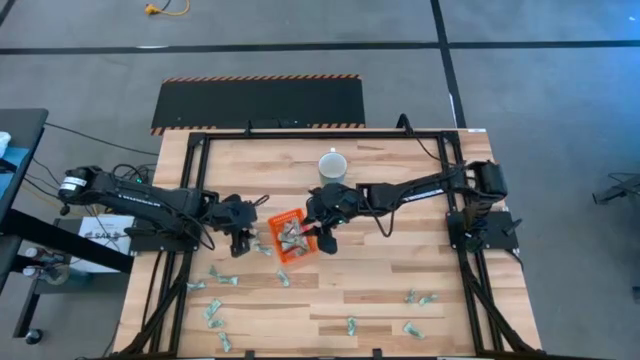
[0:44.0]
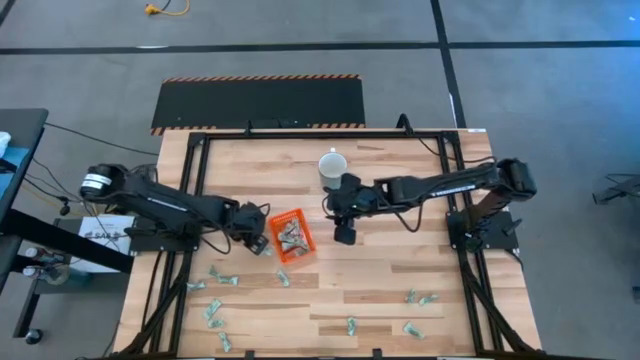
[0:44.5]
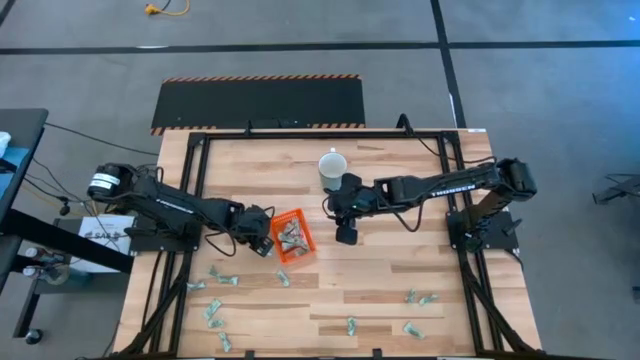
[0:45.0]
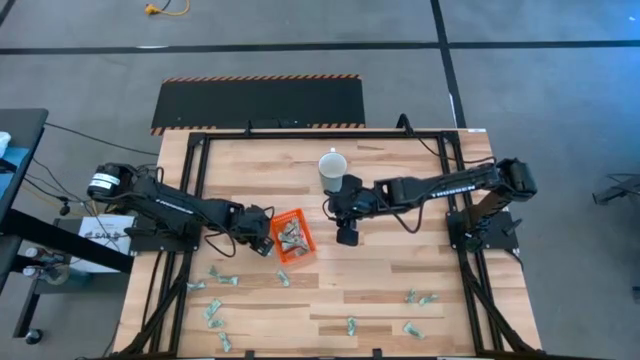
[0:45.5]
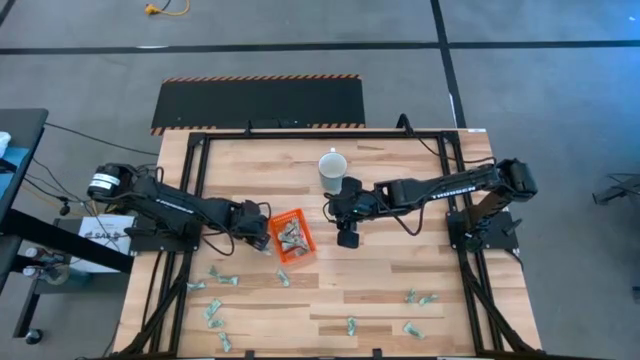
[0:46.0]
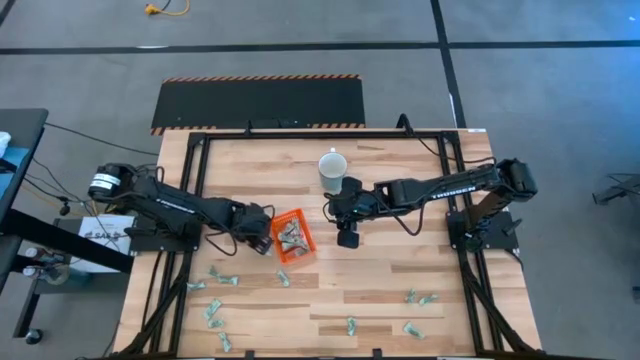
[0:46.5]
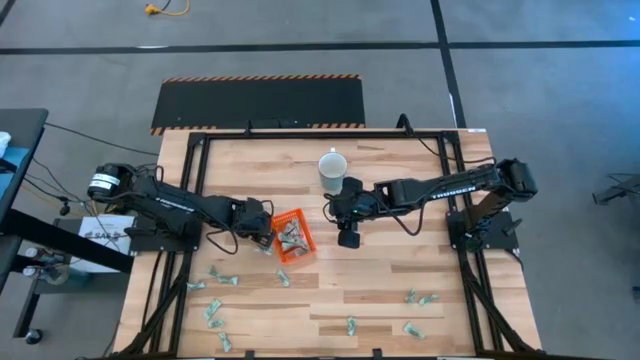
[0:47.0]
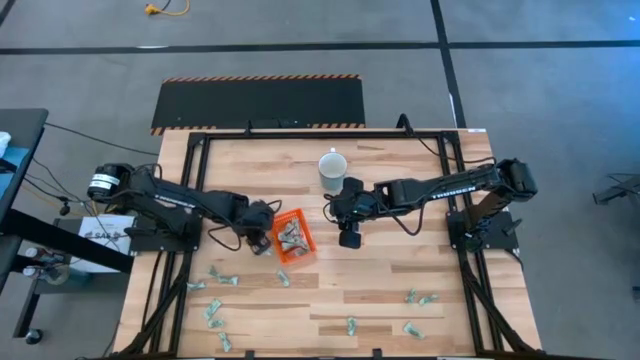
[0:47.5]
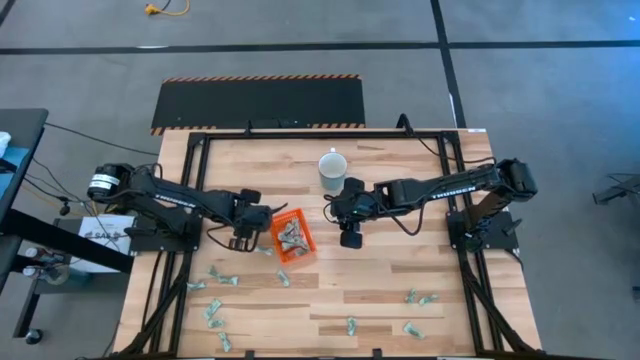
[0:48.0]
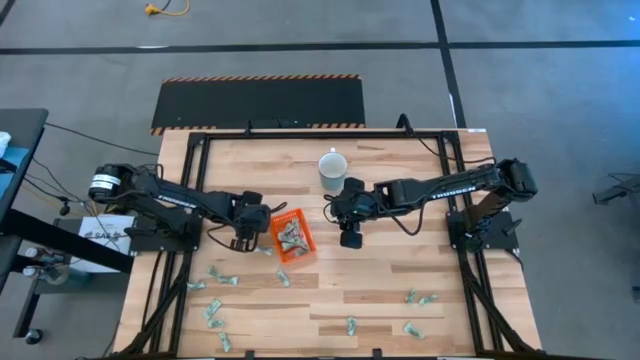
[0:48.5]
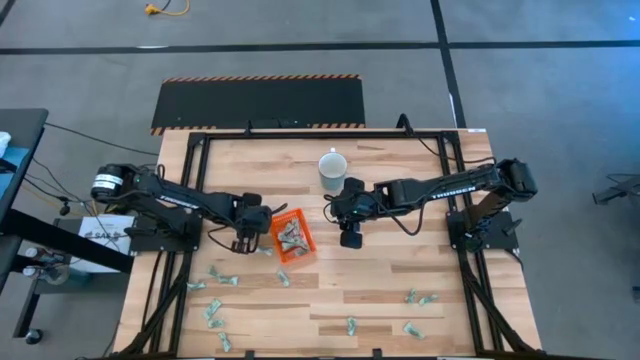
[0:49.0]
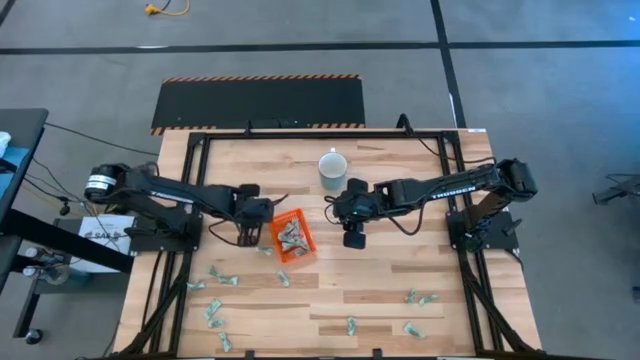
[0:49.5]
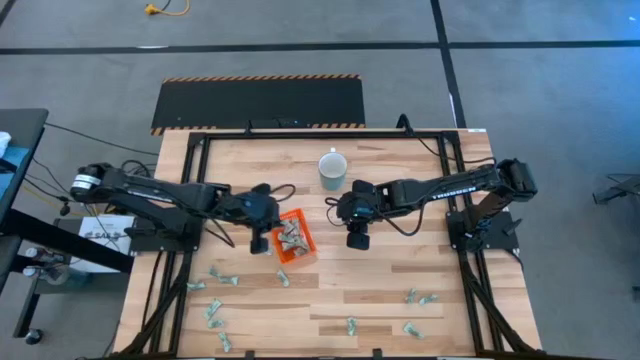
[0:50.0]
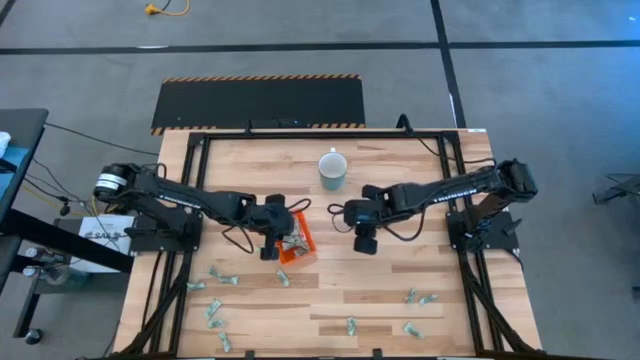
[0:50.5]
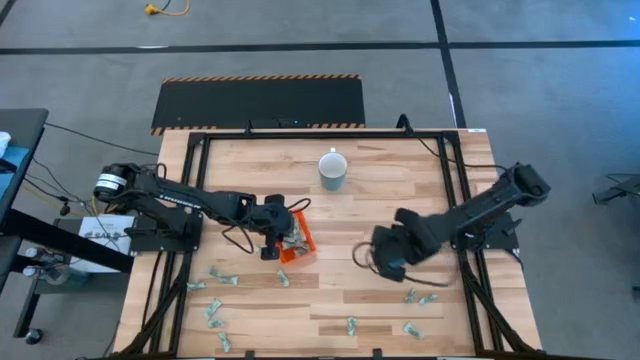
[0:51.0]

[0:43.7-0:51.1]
Task: Pick and place items into bin
Put the green stevia packet into the orange bin

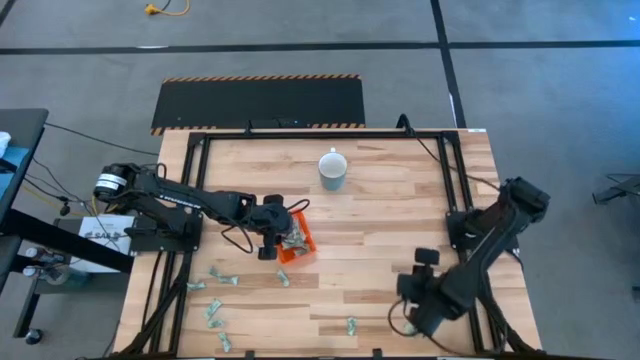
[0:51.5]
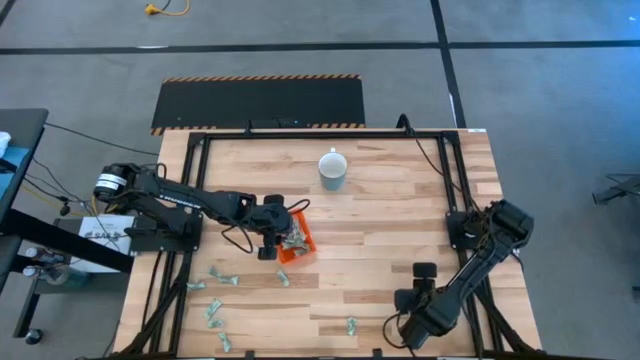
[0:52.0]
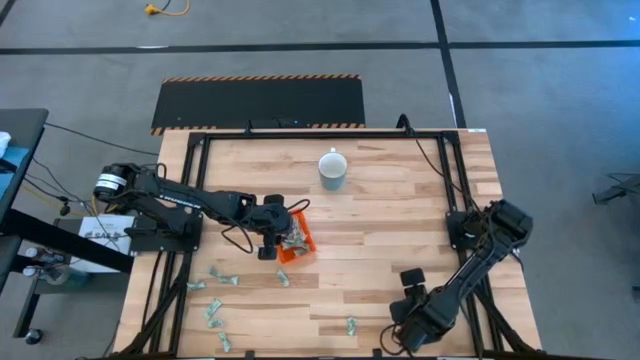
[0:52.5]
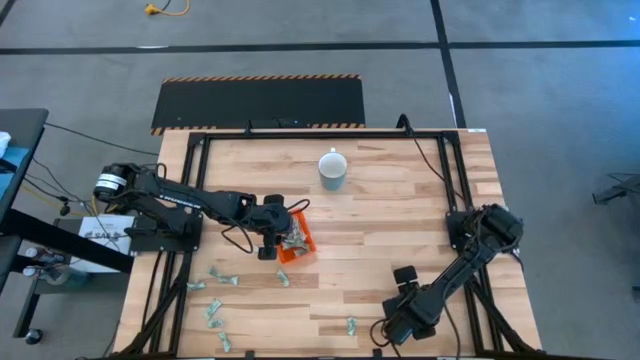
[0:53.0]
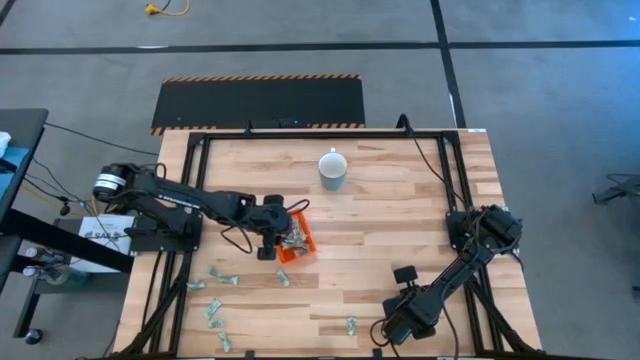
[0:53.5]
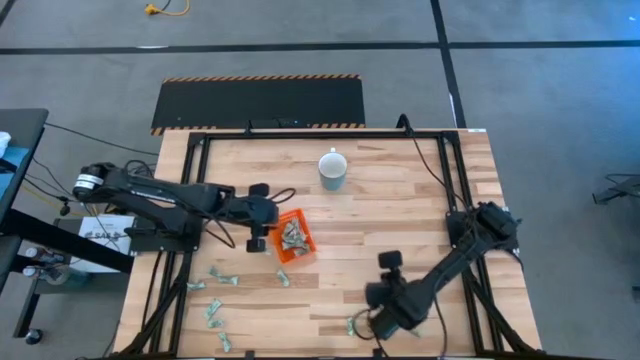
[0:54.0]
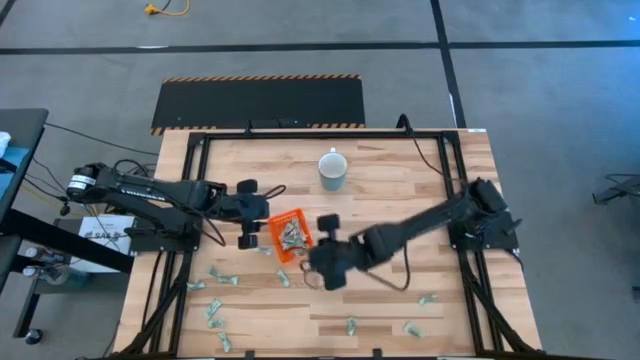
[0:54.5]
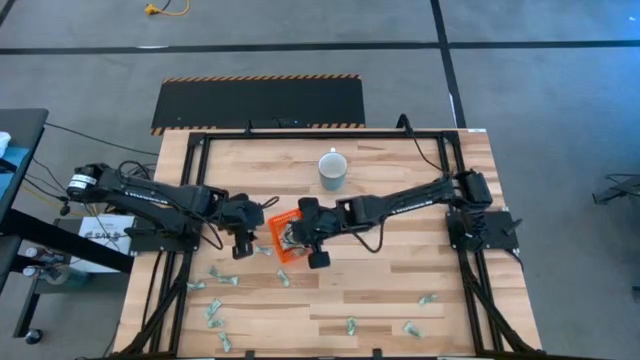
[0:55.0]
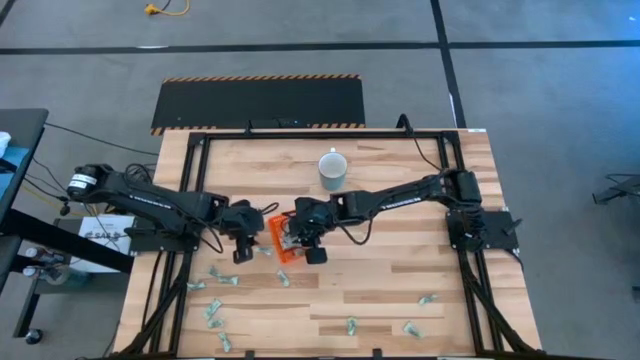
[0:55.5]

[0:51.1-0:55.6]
Put the green stevia packet into the orange bin

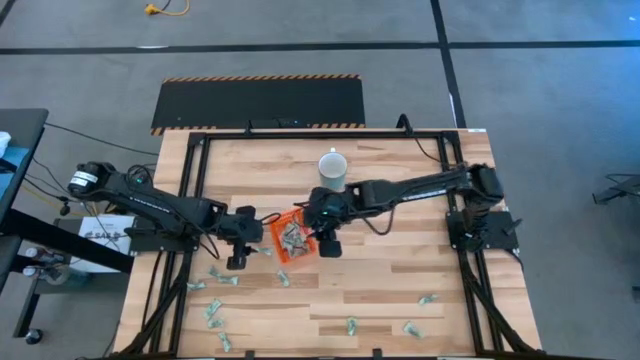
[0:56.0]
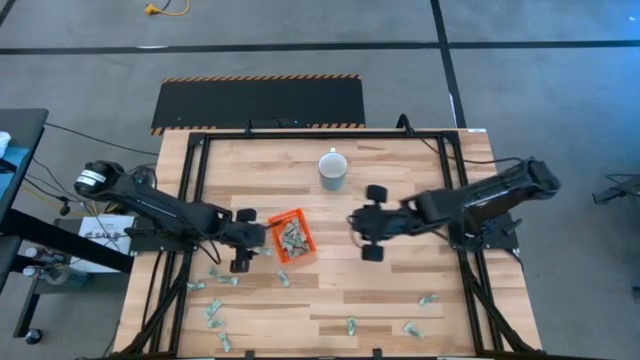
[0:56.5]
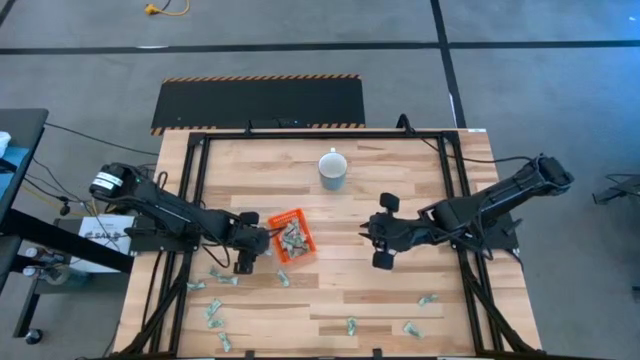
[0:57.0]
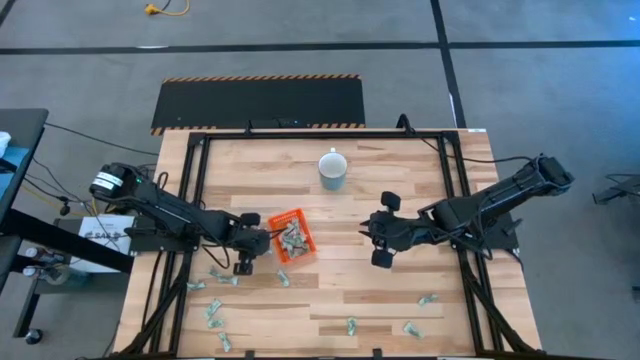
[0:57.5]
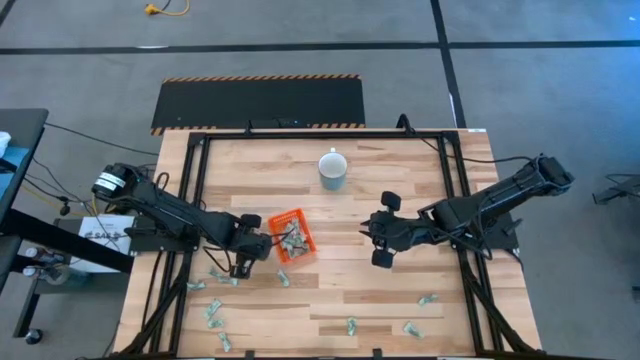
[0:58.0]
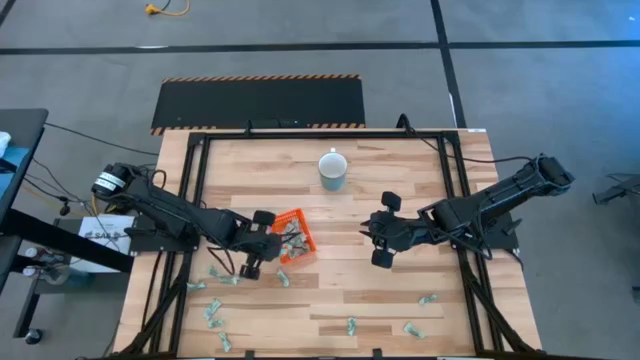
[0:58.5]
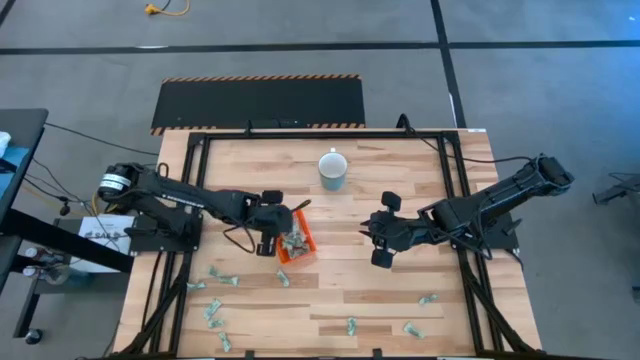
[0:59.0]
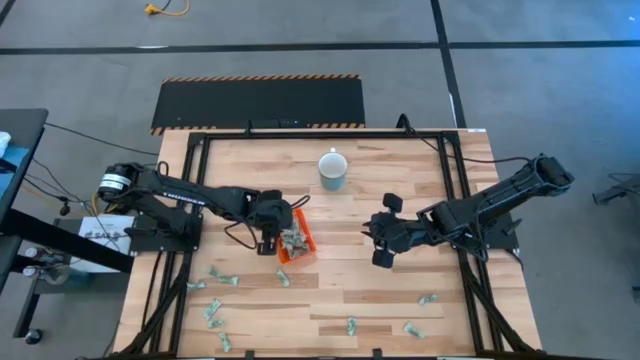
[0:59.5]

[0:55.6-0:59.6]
Put the green stevia packet into the orange bin

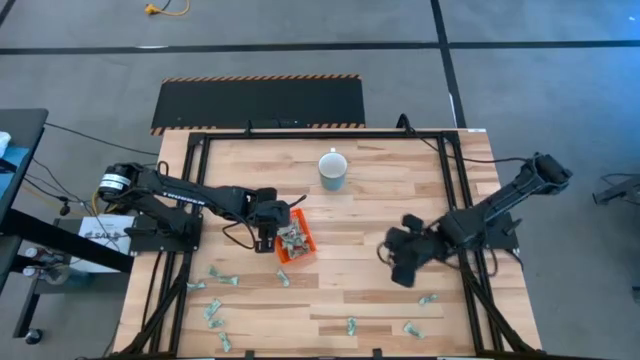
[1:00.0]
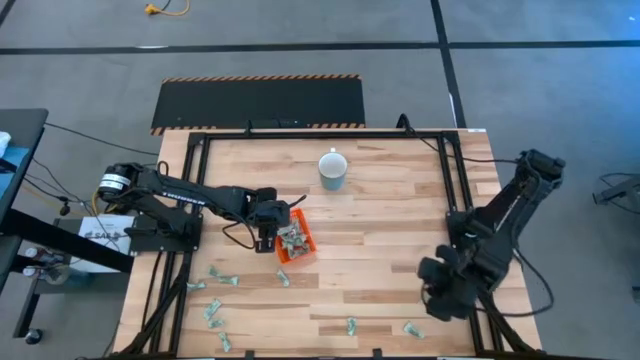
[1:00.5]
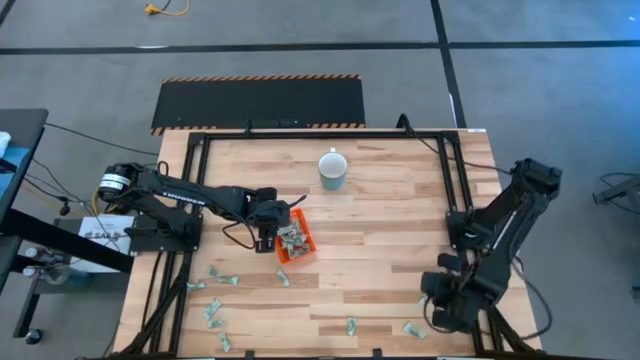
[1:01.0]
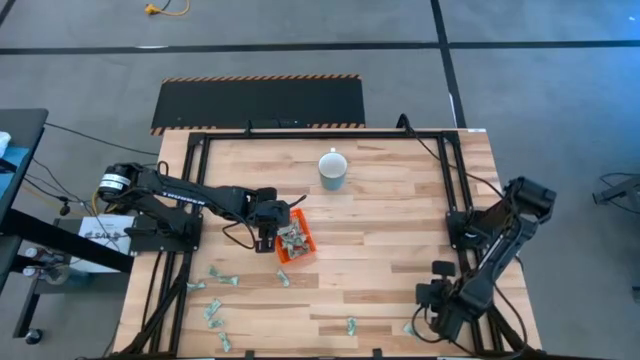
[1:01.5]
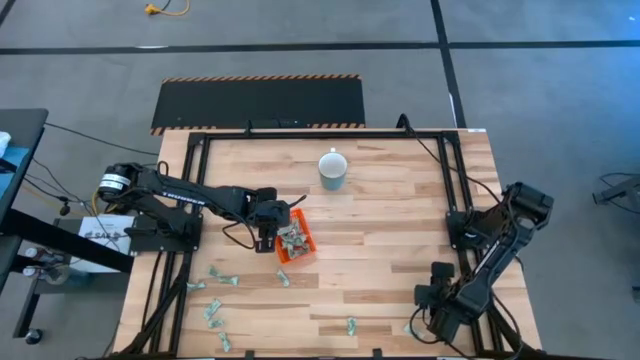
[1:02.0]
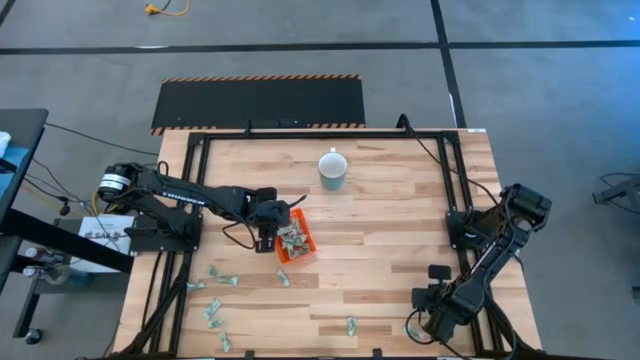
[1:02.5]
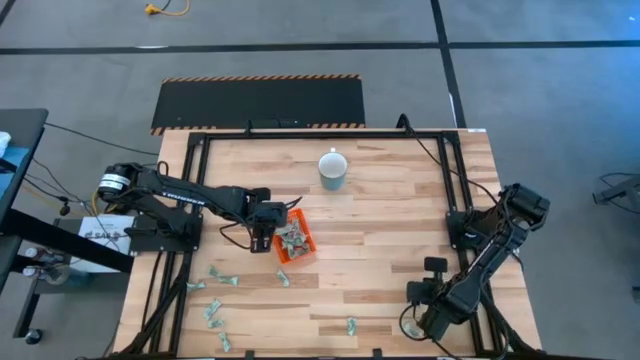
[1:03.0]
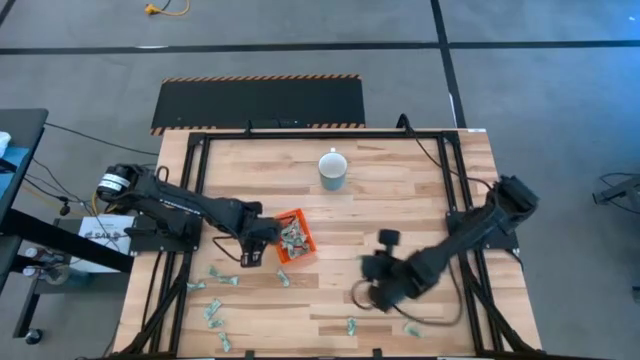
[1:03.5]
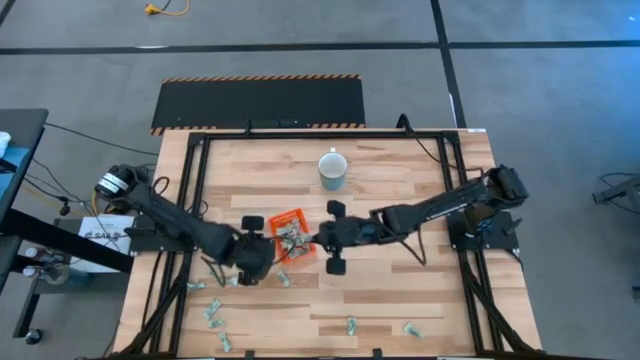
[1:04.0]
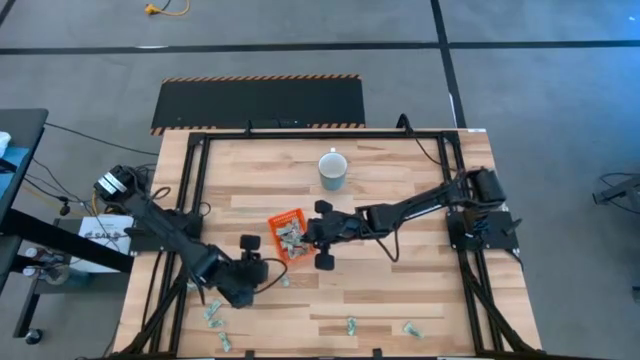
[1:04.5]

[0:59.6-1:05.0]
Put the green stevia packet into the orange bin
